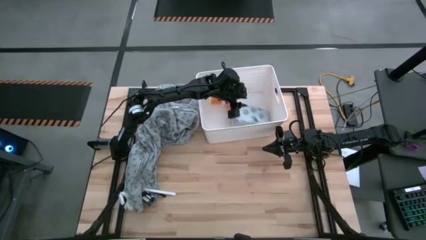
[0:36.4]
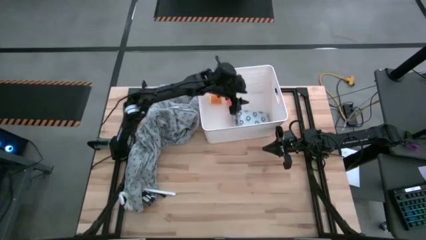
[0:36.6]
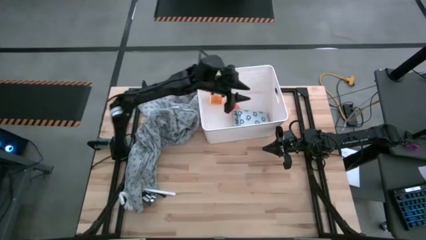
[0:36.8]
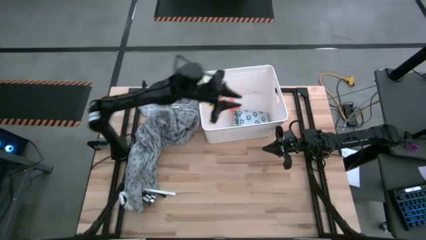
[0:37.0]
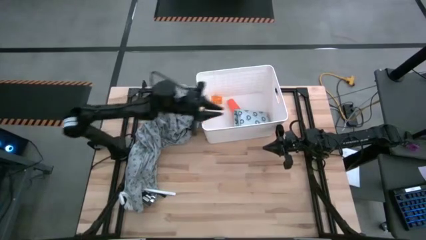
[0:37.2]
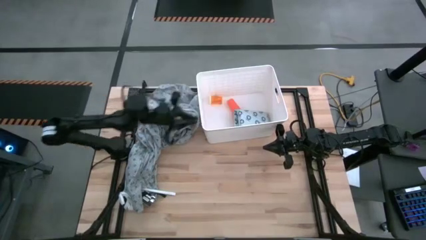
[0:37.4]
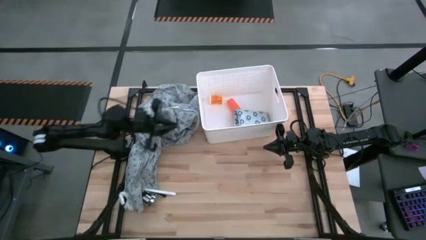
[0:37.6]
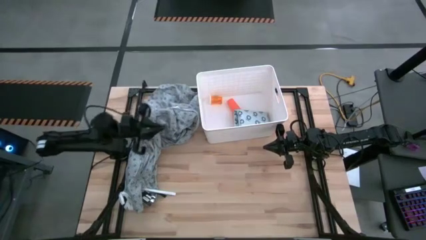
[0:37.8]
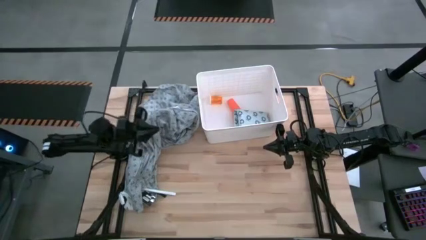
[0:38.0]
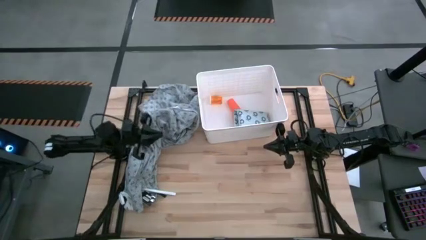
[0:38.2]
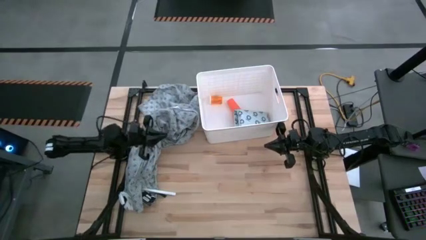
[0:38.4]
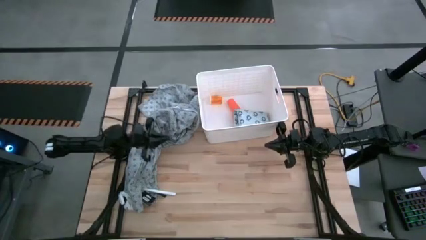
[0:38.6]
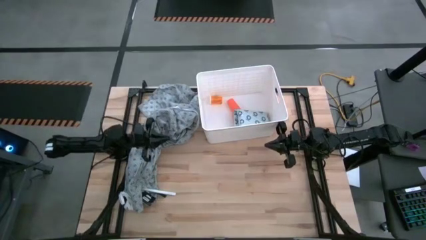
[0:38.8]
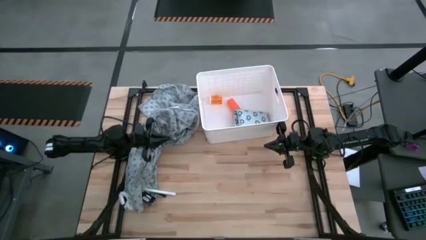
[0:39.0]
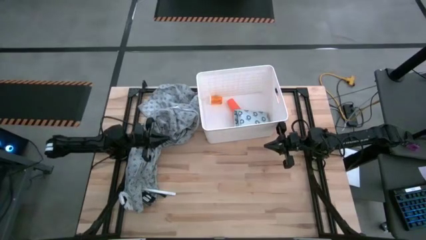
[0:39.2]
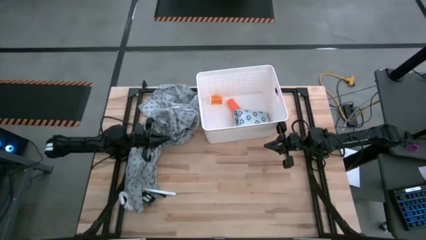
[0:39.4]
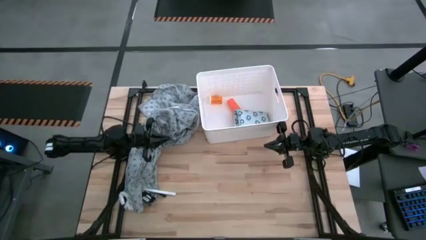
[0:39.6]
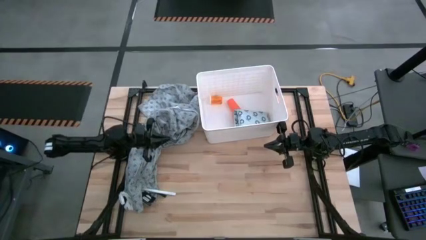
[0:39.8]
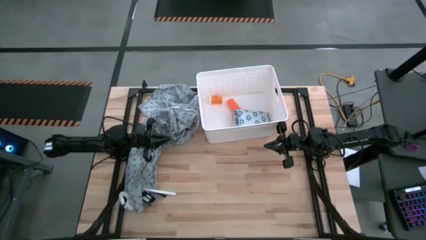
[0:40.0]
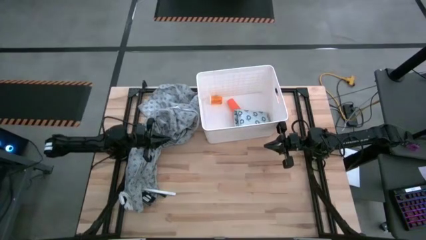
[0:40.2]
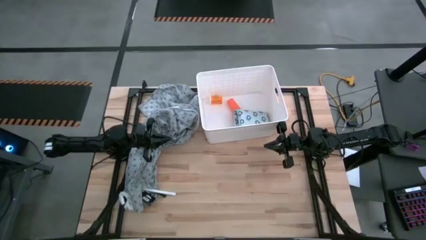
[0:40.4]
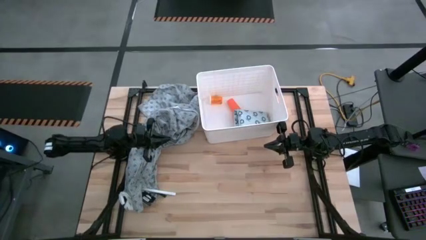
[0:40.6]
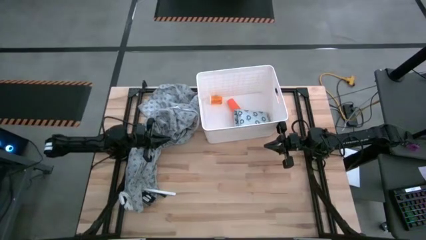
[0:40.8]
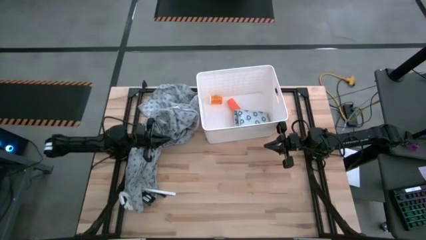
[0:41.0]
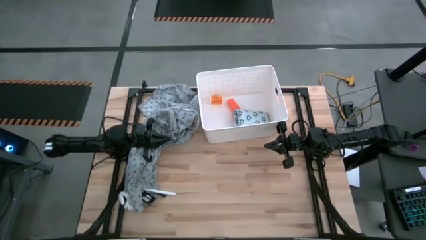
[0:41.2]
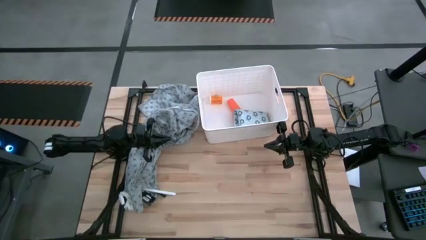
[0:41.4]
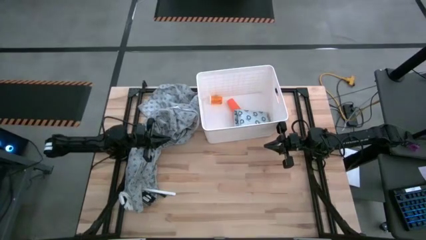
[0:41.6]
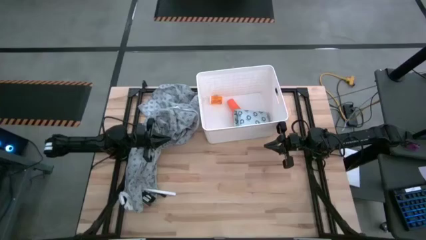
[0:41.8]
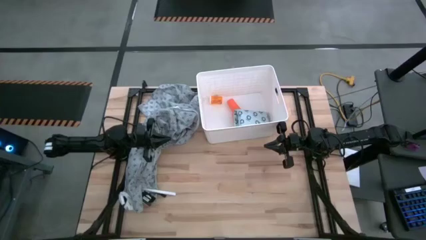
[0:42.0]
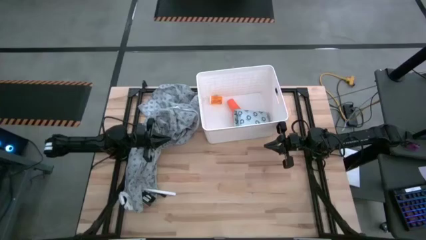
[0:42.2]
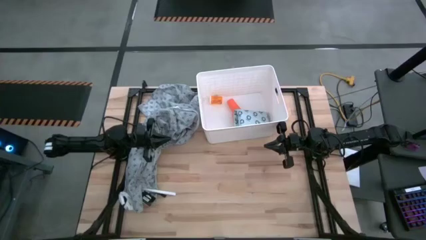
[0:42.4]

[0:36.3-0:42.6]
Task: Pick & place medical supplies in basket/bin
Return to Home Position

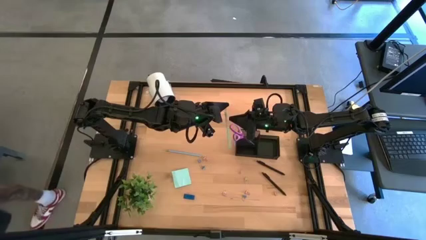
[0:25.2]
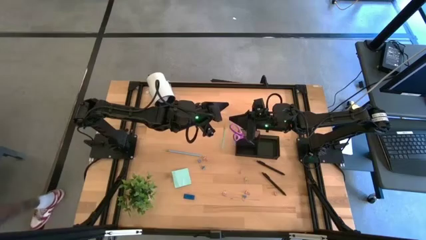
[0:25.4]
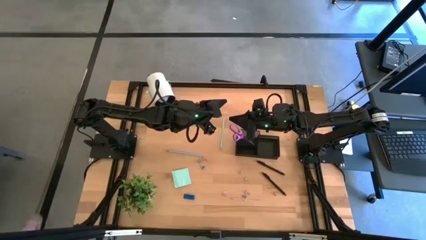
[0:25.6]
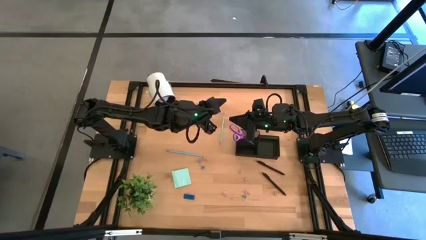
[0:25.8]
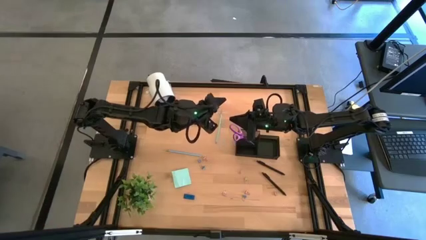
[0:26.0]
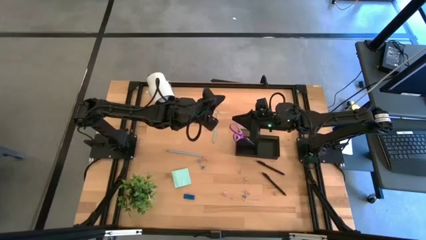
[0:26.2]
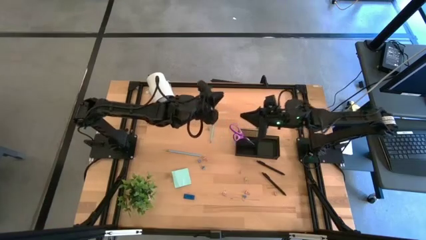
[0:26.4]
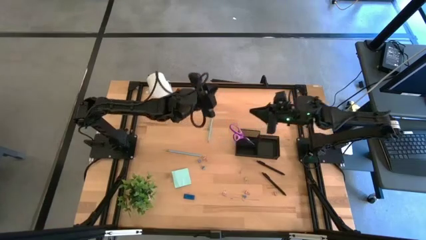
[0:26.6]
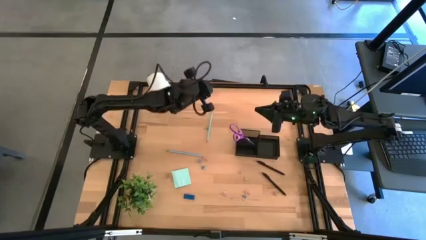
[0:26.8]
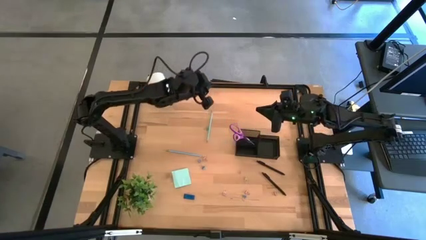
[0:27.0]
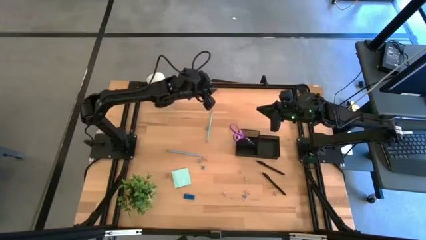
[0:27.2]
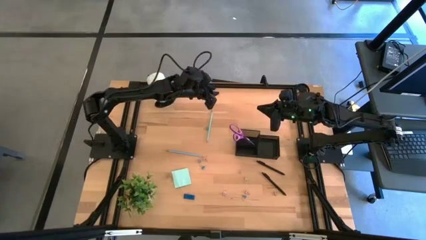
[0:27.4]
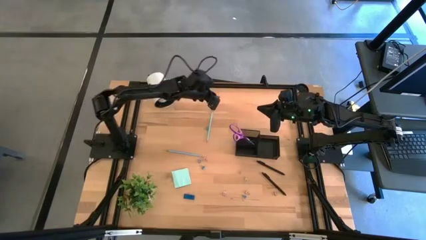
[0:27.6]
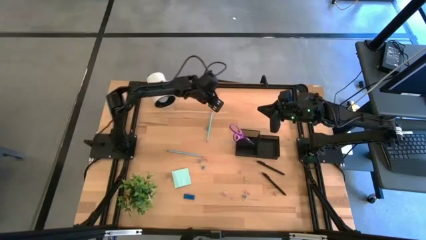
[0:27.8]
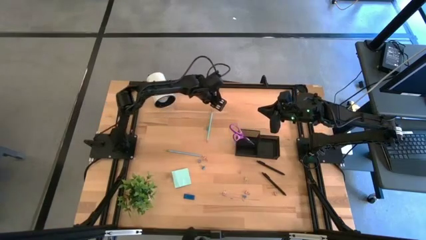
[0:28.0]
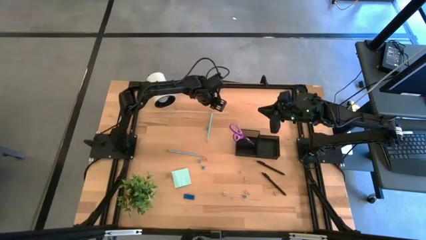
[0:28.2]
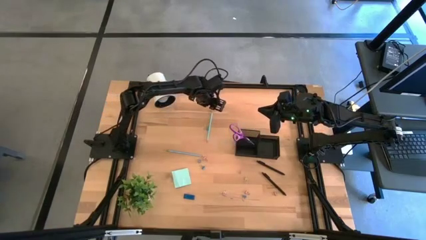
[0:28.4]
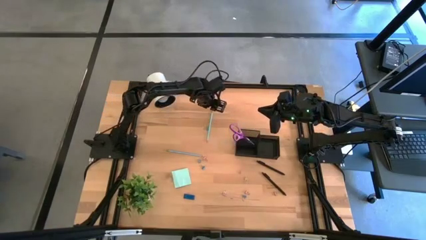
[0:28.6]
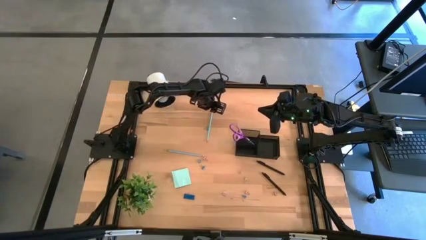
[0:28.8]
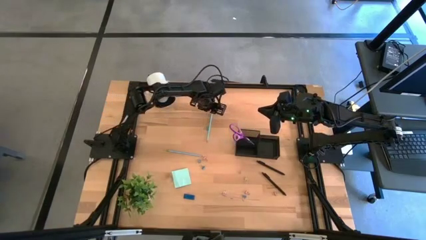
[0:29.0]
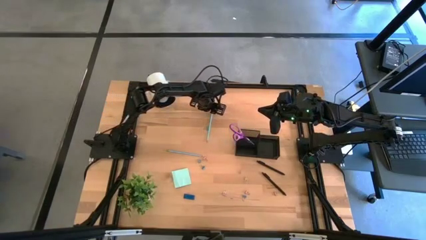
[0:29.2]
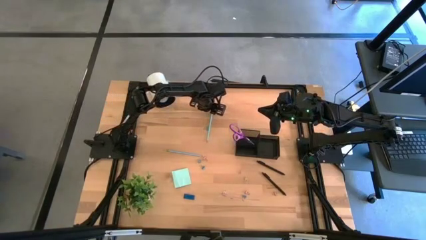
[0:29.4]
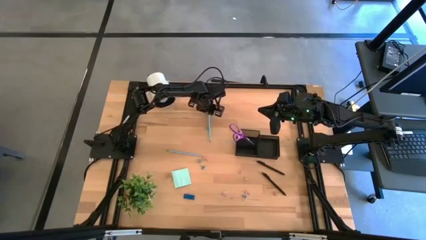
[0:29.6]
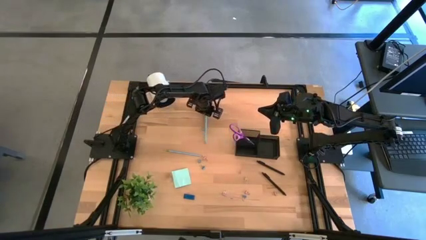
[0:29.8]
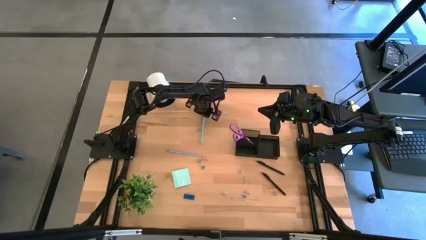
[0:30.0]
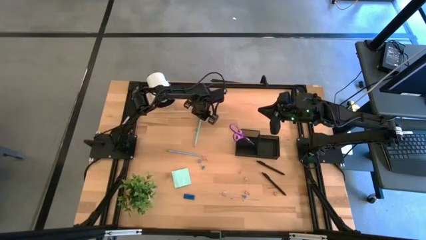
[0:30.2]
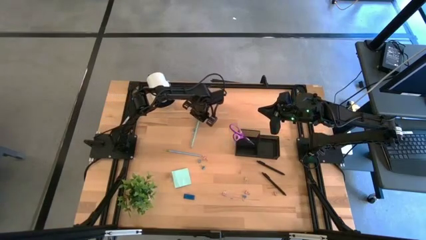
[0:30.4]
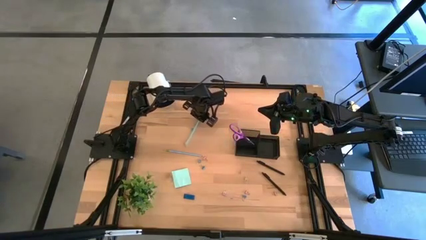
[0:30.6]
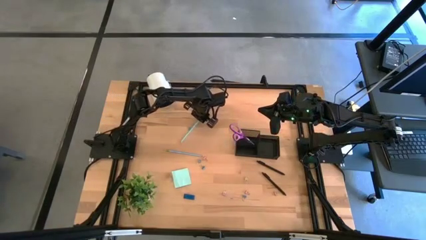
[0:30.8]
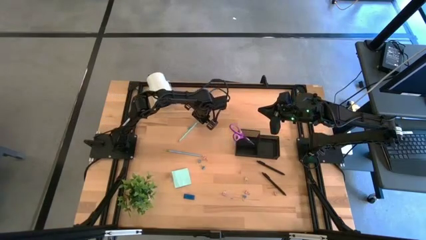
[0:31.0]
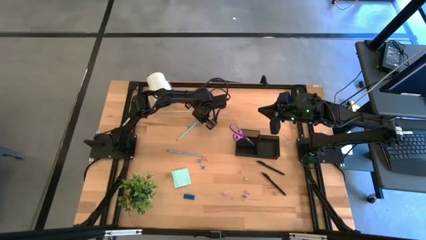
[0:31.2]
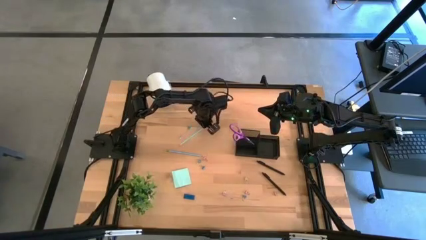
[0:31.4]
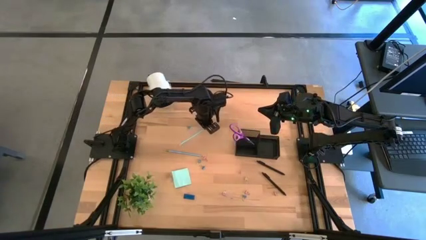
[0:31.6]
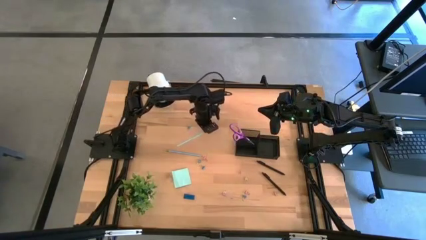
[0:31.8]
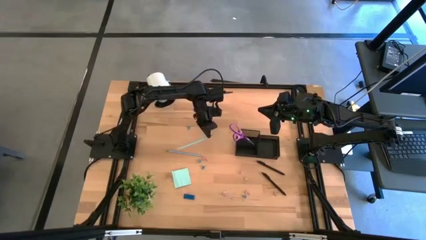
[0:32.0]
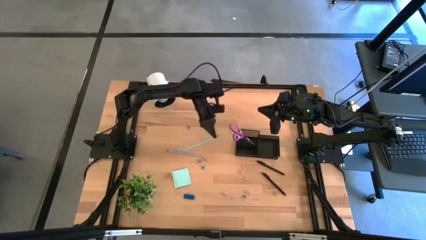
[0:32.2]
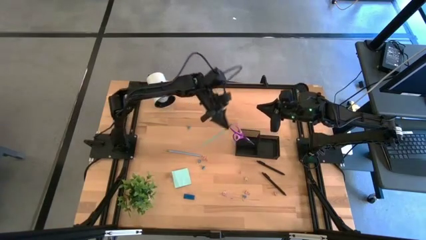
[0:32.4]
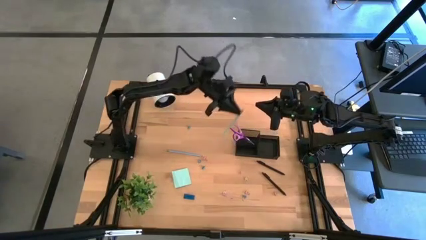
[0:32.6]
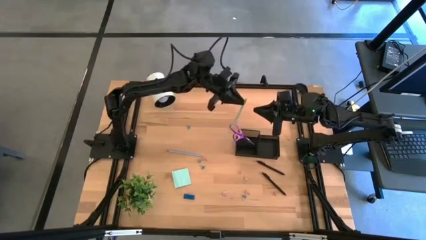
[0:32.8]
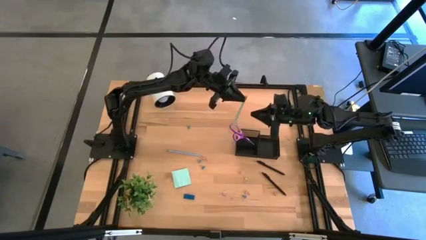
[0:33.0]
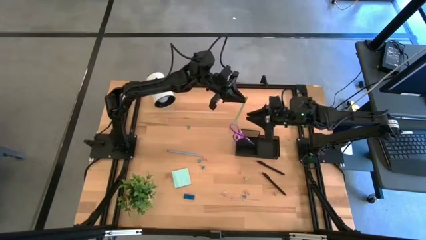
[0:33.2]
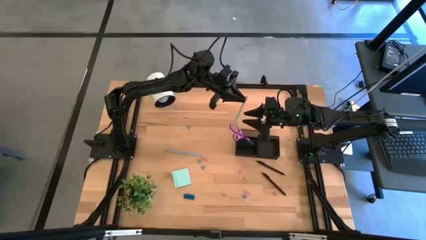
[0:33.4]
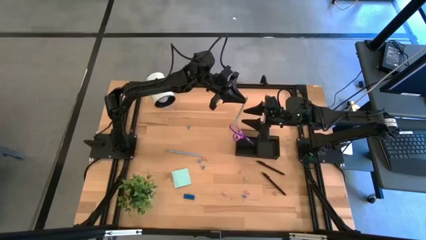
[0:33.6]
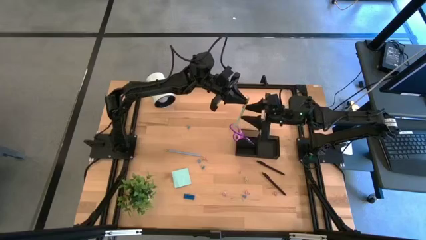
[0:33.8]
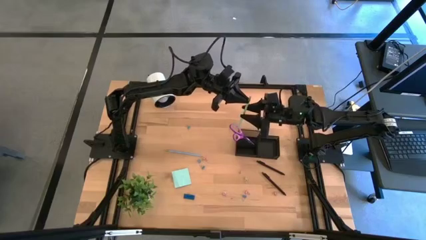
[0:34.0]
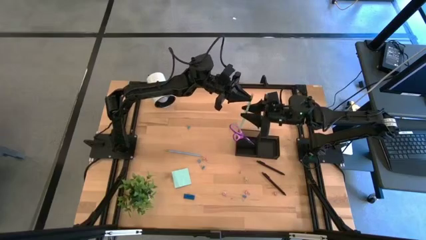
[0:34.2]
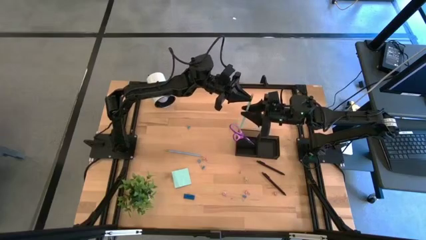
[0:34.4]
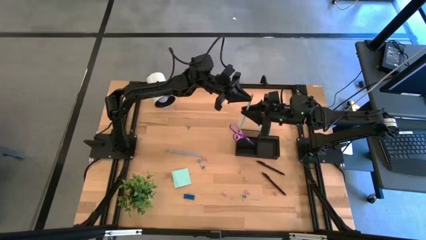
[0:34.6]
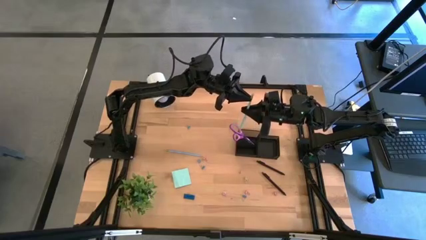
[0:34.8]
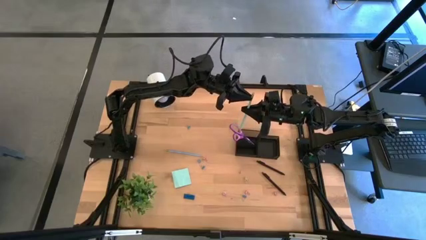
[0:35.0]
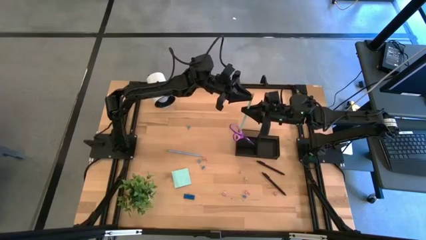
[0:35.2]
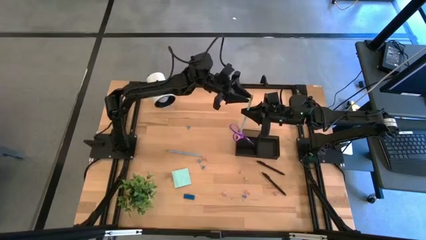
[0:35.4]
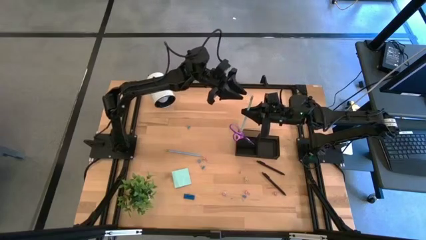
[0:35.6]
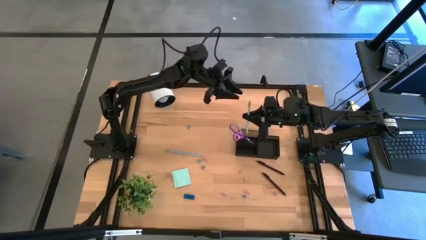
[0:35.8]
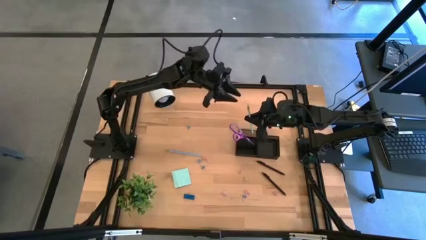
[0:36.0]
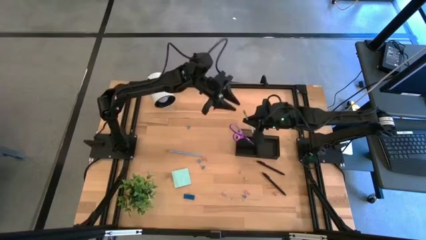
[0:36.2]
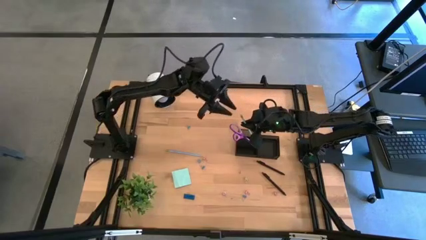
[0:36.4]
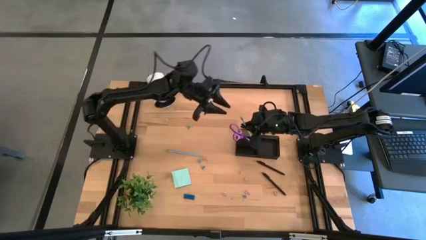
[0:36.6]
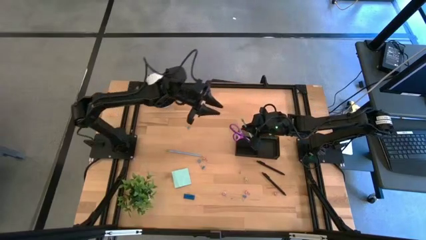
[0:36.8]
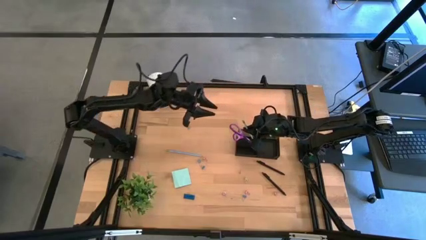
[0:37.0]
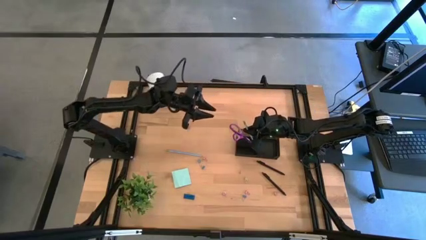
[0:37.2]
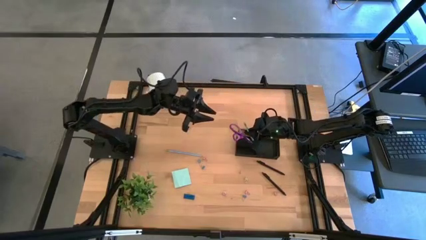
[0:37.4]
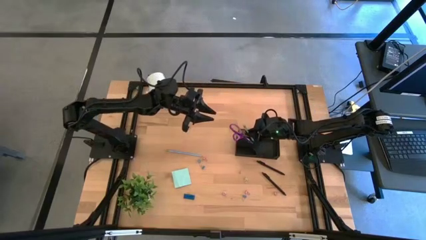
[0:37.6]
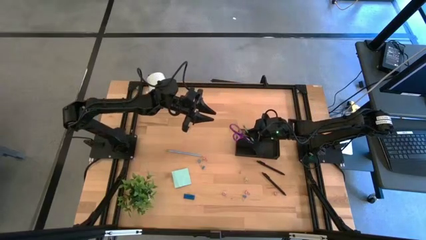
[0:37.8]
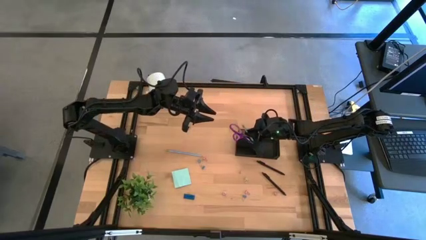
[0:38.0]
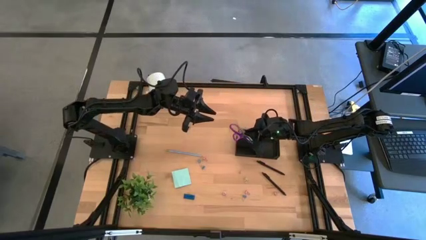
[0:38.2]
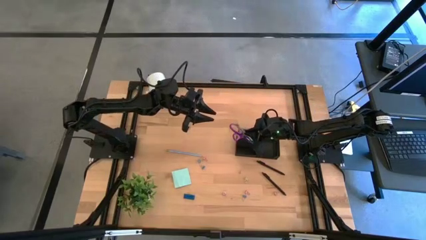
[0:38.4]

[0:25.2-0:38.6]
Task: Pick and place office supplies into organizer
Put the light blue pencil into the black desk organizer
